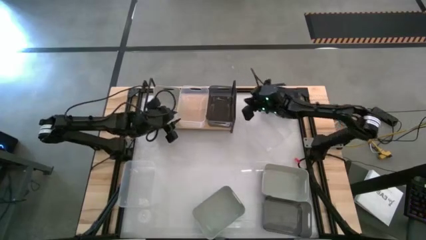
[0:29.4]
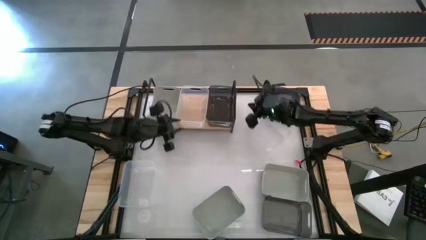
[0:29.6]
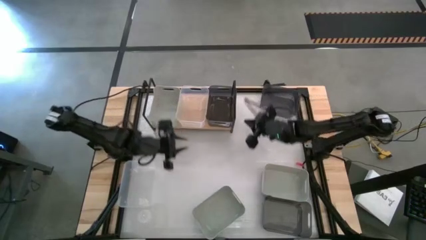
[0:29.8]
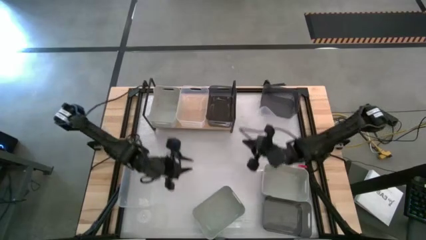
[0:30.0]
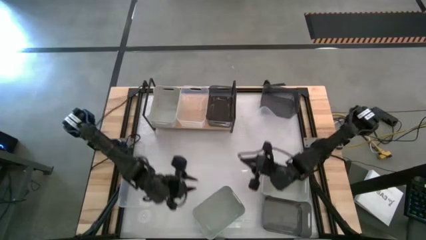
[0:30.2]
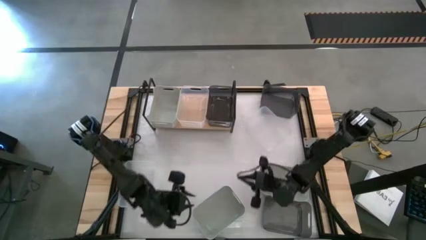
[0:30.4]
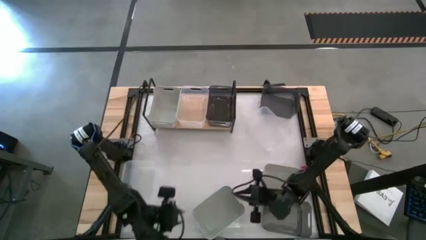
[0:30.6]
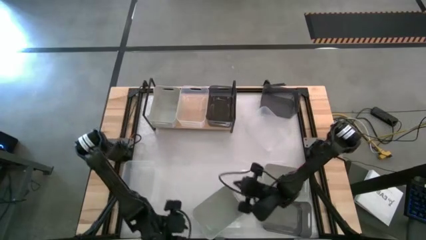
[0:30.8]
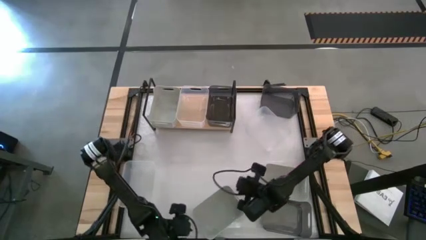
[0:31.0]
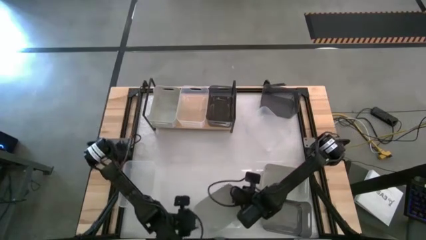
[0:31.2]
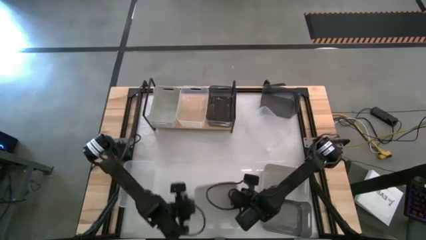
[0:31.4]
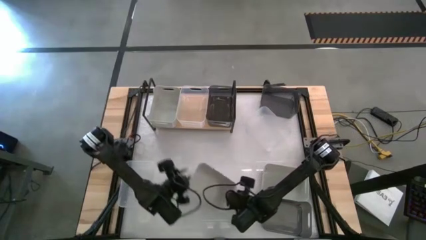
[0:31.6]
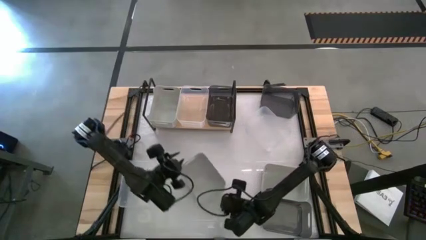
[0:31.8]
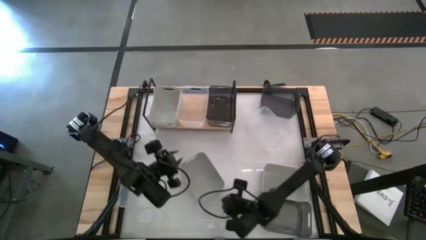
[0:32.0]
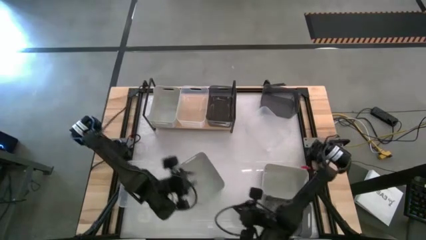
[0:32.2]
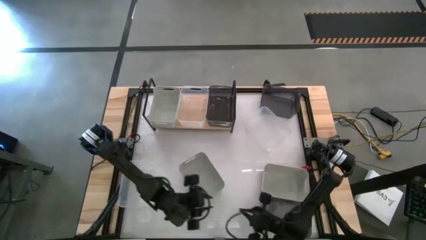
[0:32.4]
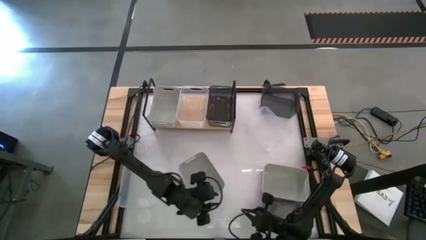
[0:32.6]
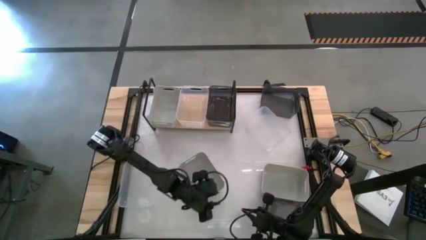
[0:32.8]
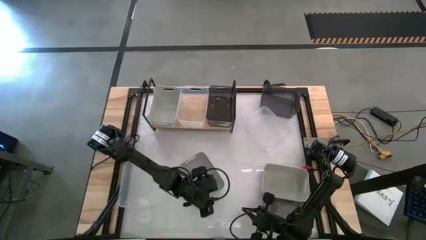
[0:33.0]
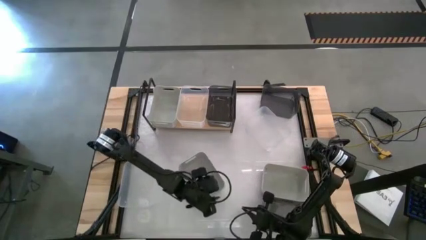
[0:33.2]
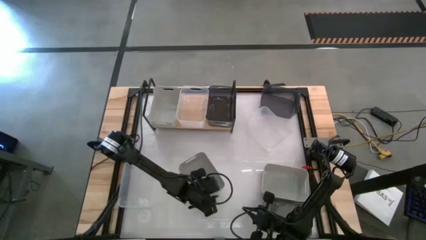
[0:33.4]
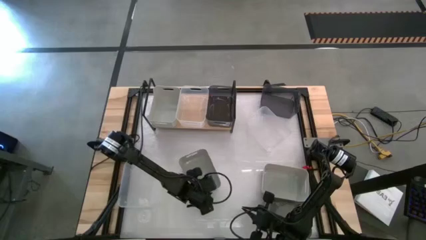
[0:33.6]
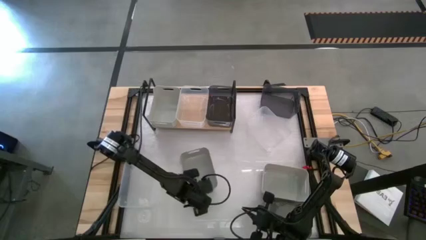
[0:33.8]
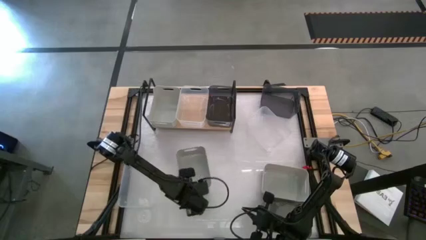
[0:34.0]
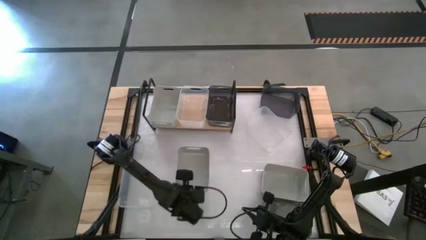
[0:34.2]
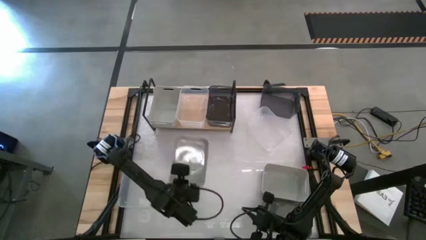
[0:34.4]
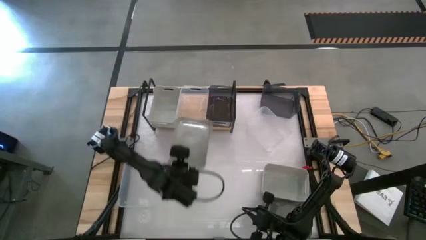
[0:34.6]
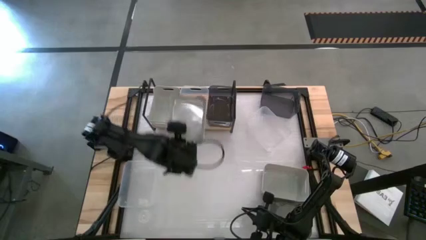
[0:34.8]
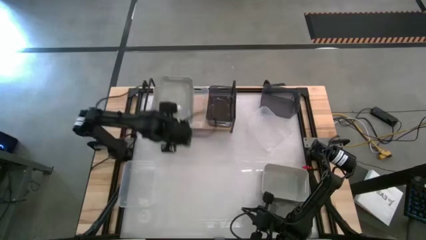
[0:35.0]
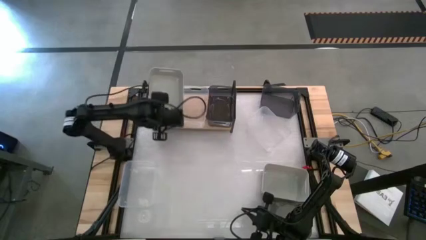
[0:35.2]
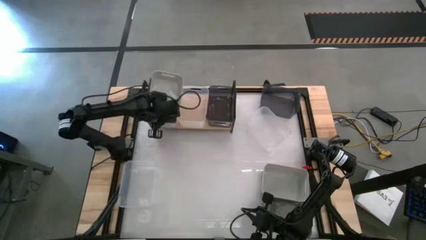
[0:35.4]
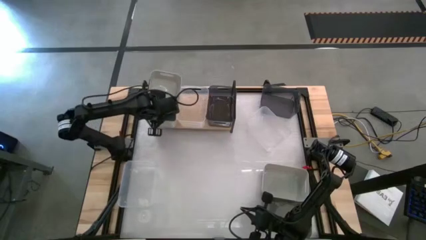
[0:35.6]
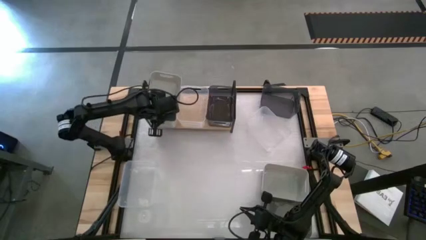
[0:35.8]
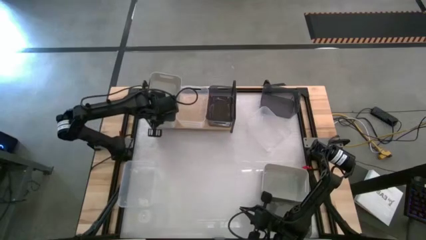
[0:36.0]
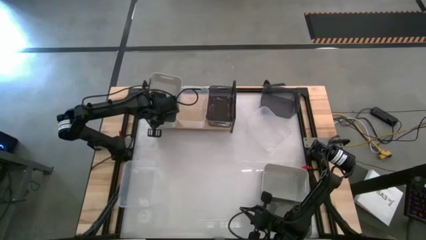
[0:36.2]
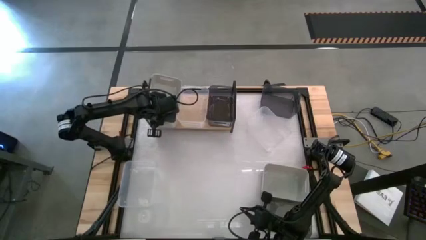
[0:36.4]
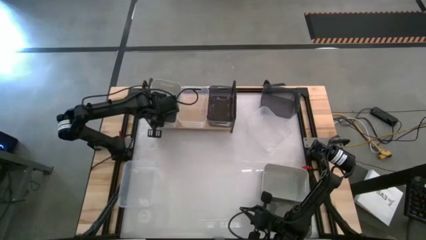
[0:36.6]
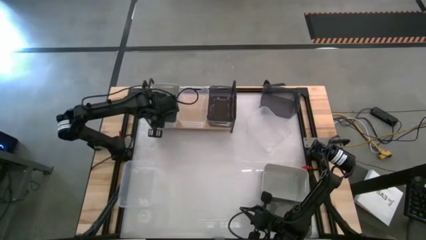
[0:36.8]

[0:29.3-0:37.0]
Task: Stack baskets on shelf by color
Stack the left gray bin on top of the gray bin on the shelf

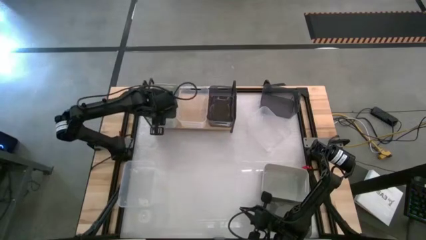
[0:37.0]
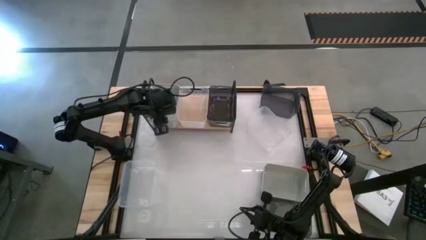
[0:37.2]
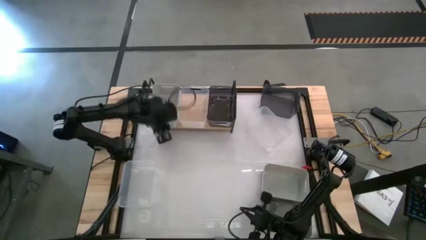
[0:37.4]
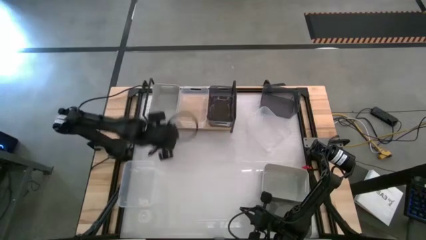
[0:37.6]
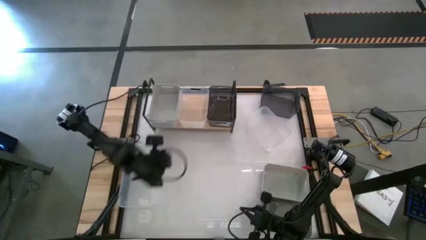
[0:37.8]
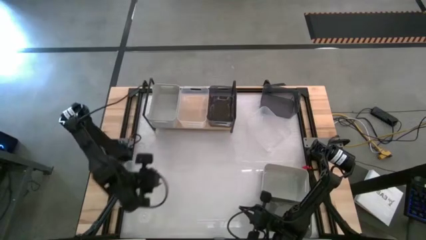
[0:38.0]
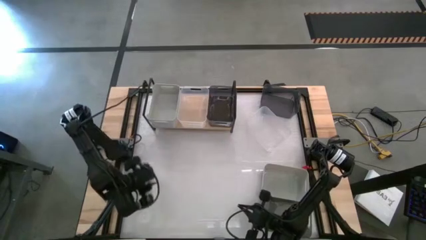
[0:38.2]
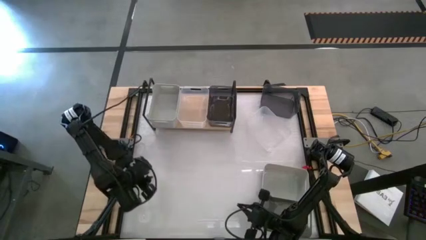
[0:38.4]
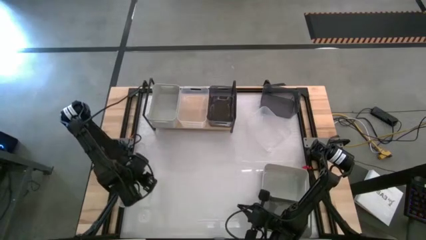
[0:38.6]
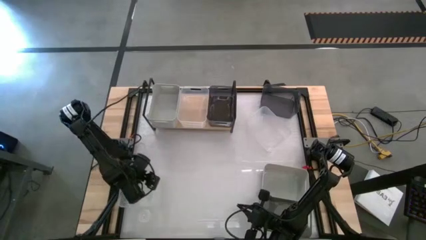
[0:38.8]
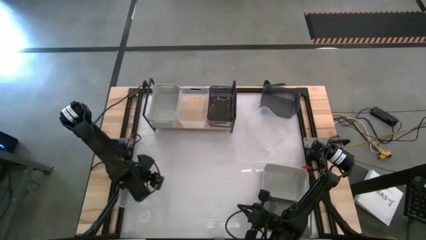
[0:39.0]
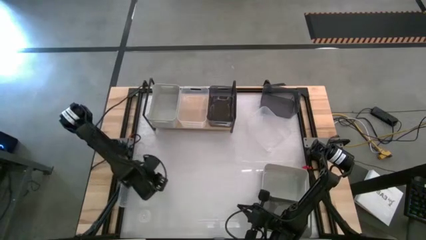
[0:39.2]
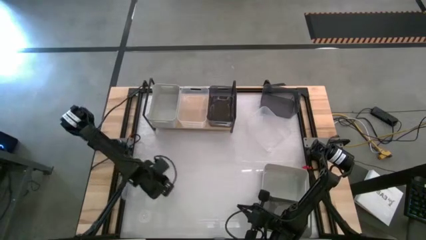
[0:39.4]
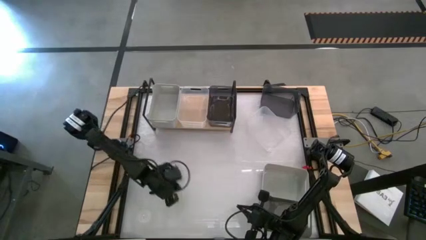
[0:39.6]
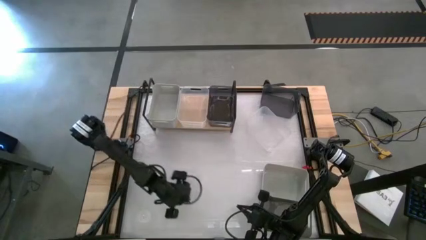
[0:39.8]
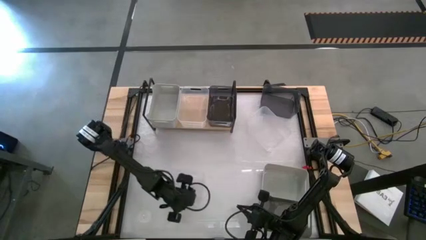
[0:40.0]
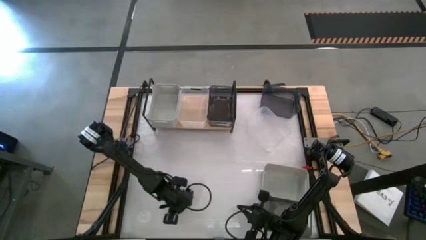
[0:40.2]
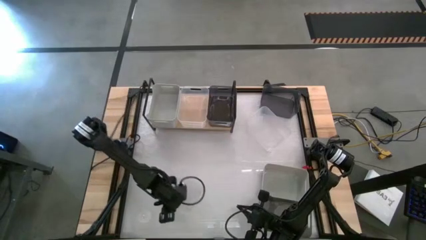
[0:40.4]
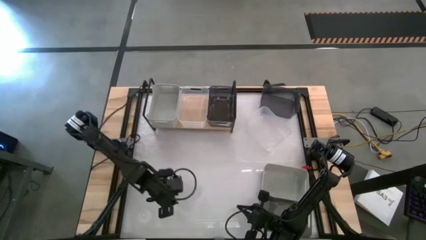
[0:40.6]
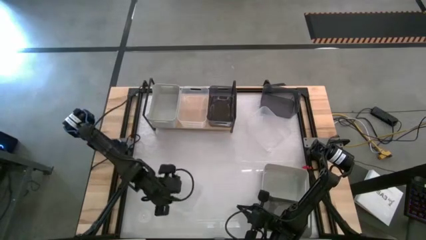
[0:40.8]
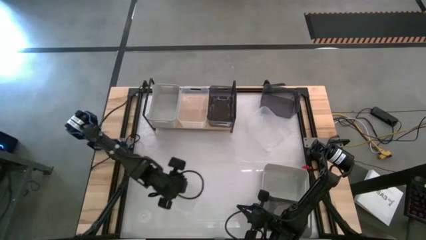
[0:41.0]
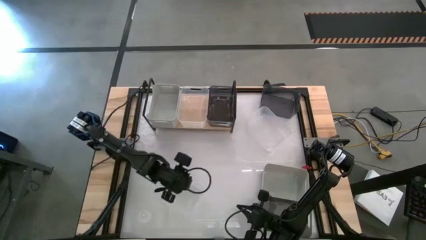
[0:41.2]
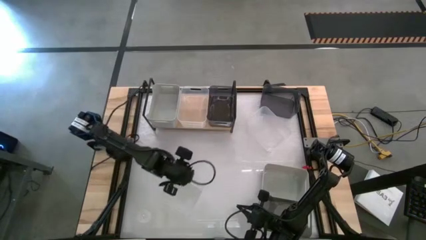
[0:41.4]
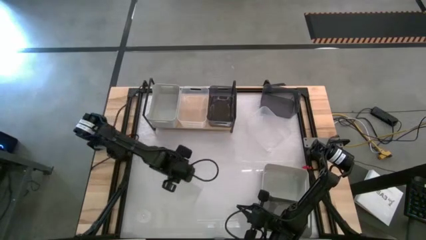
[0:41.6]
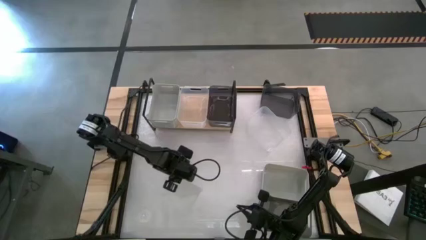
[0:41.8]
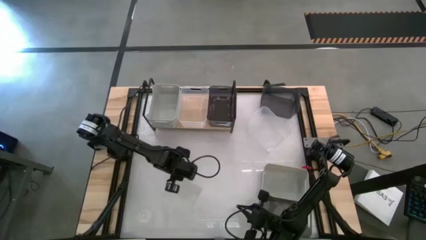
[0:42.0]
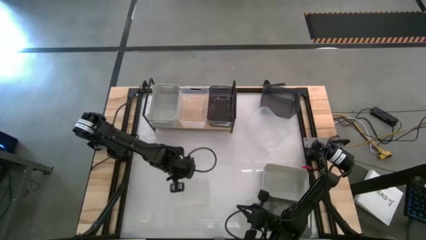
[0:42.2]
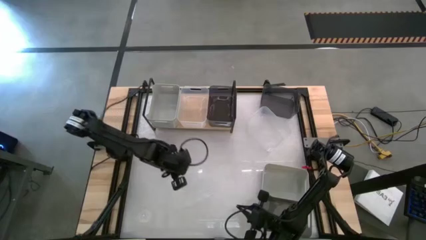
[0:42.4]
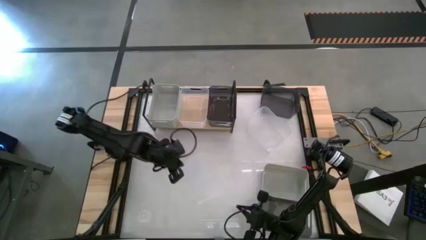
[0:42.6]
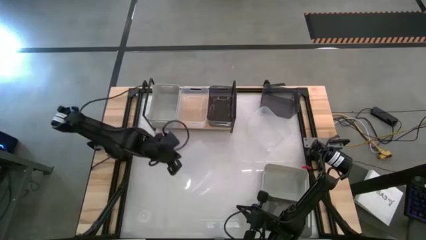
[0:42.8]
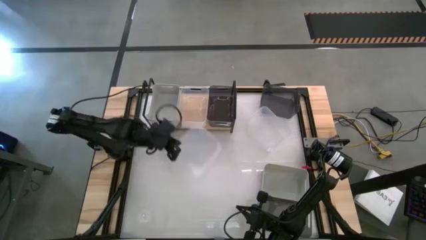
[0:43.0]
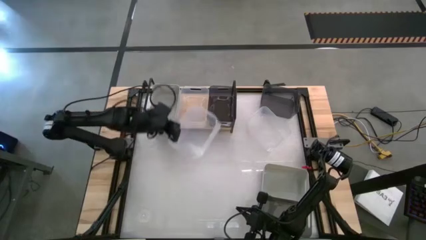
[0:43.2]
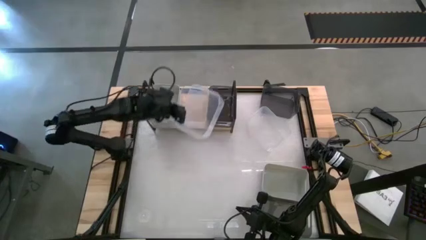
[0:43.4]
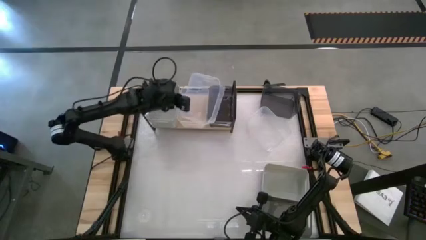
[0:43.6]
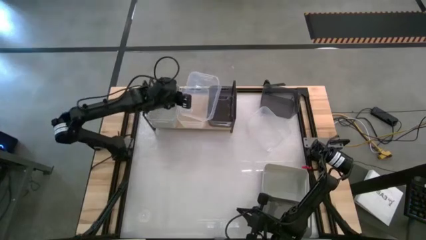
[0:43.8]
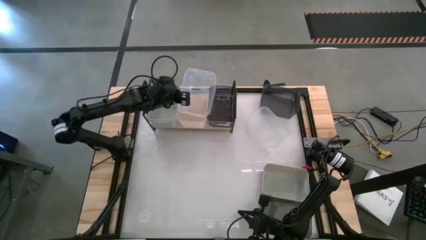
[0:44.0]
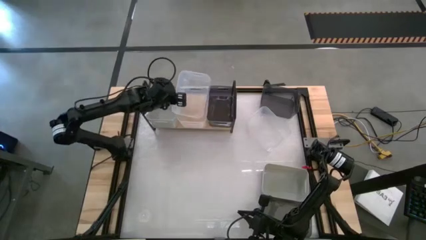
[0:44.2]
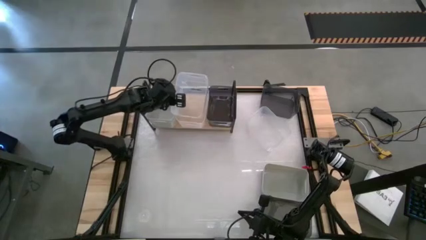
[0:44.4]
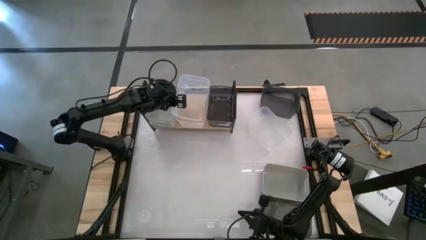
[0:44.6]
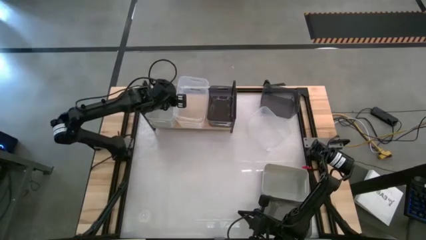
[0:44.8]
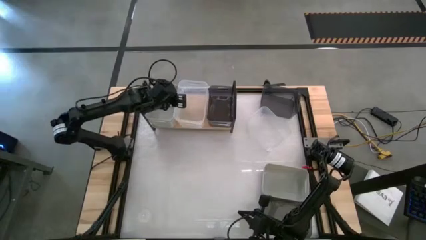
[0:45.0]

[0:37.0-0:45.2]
Stack the left transparent bin on top of the transparent bin on the shelf
